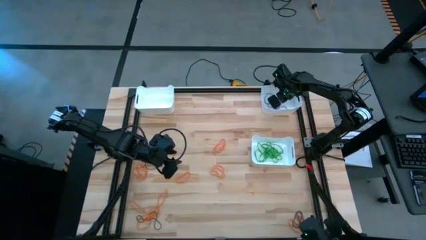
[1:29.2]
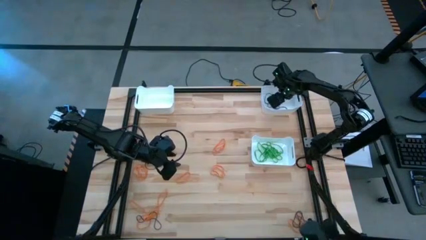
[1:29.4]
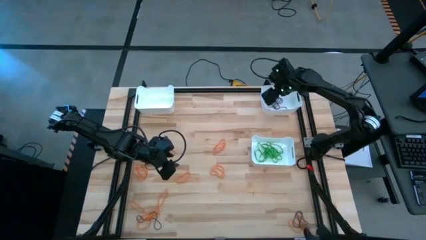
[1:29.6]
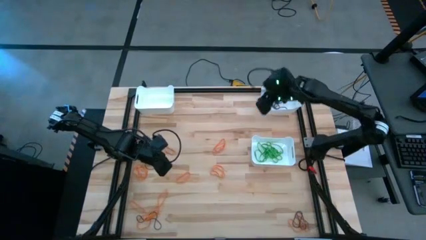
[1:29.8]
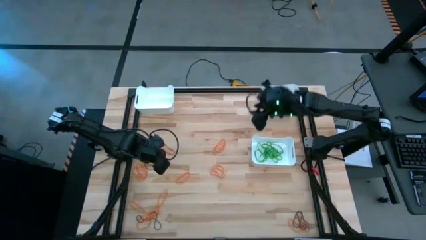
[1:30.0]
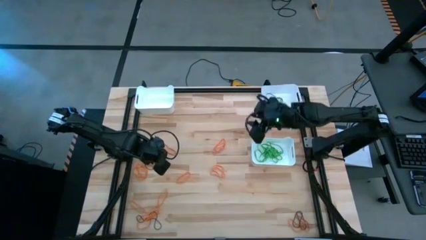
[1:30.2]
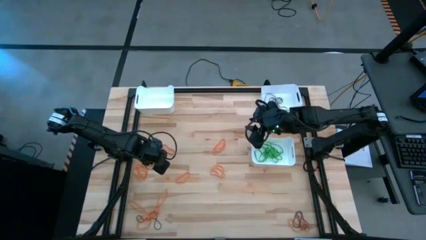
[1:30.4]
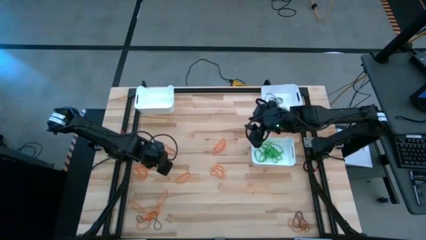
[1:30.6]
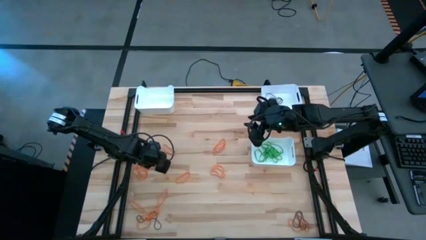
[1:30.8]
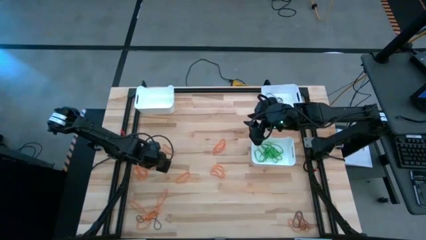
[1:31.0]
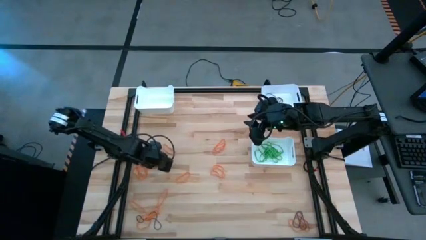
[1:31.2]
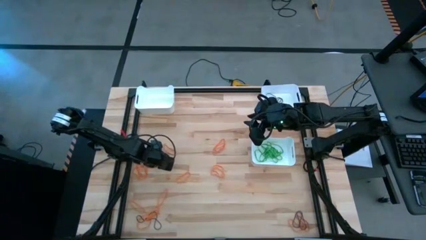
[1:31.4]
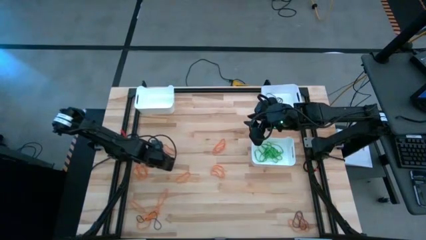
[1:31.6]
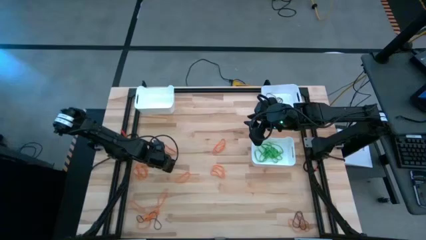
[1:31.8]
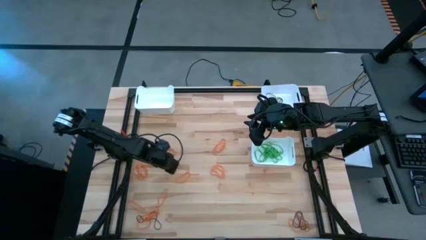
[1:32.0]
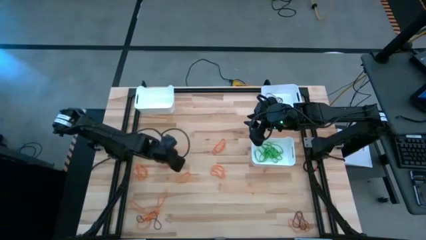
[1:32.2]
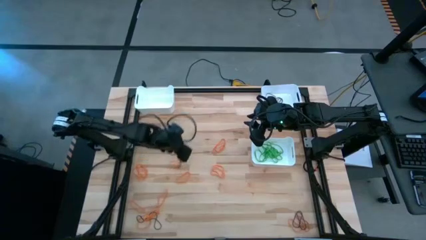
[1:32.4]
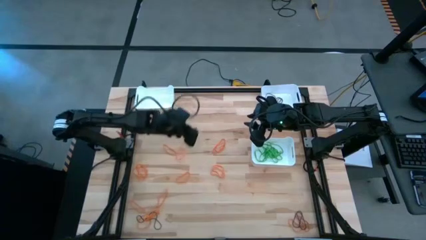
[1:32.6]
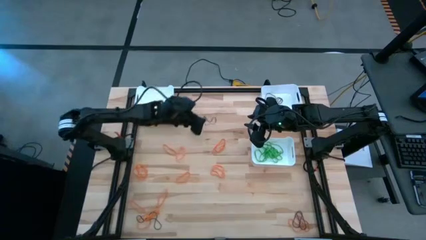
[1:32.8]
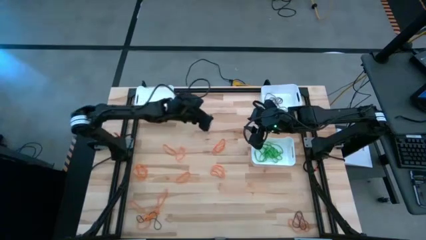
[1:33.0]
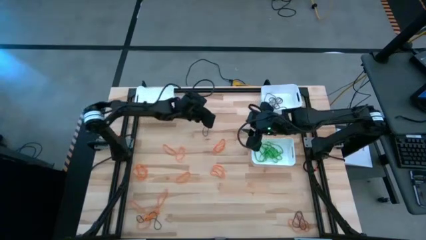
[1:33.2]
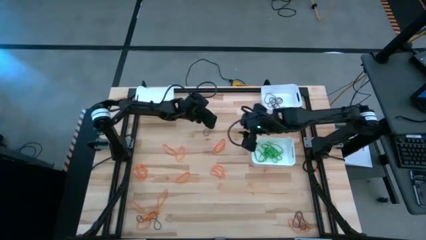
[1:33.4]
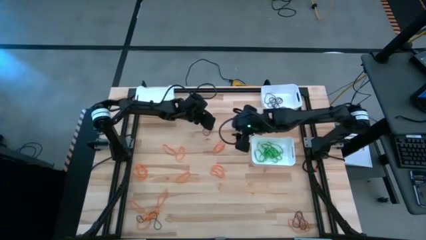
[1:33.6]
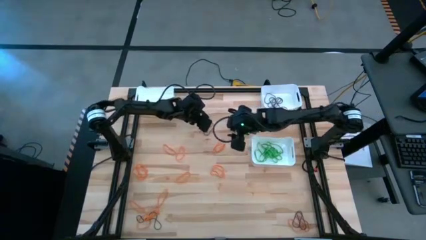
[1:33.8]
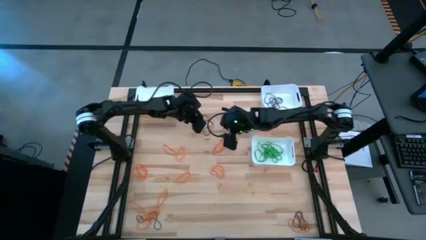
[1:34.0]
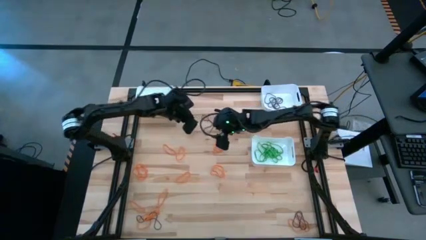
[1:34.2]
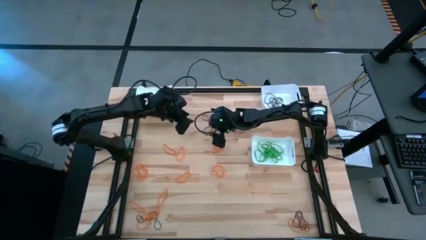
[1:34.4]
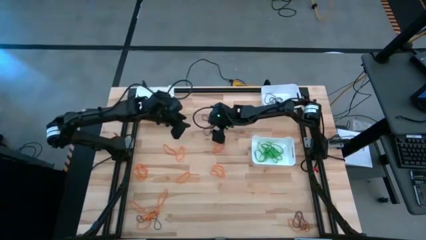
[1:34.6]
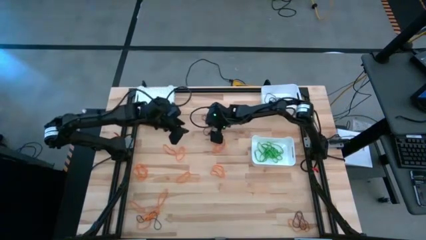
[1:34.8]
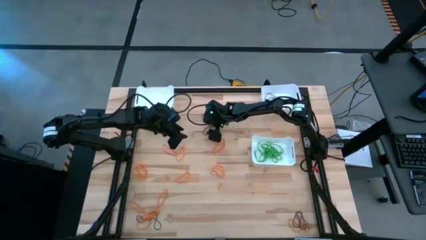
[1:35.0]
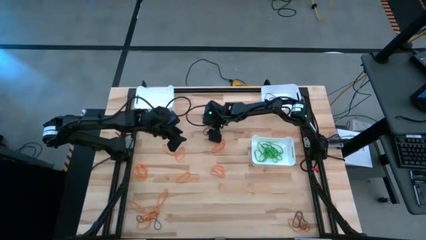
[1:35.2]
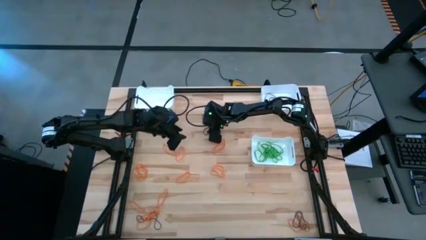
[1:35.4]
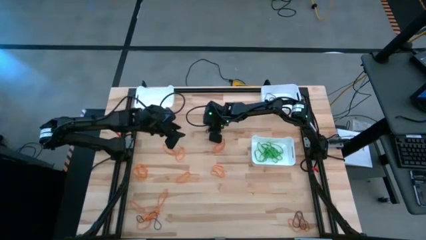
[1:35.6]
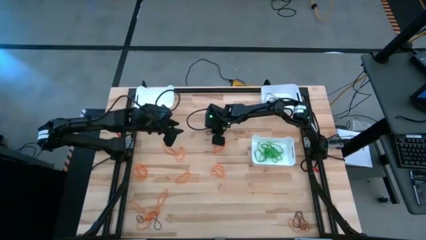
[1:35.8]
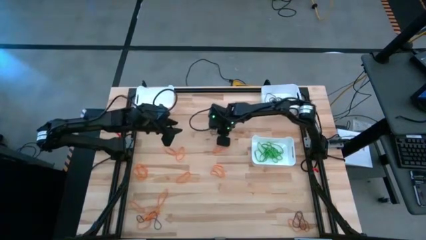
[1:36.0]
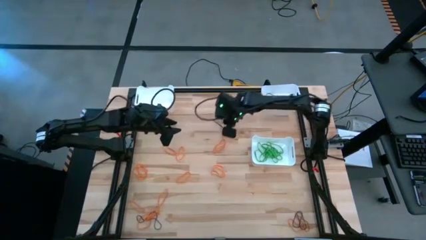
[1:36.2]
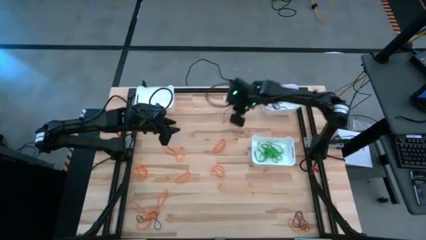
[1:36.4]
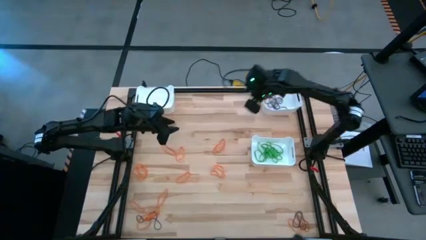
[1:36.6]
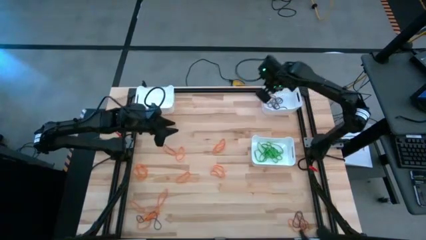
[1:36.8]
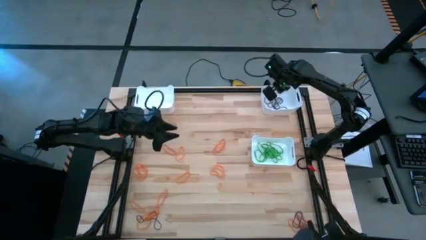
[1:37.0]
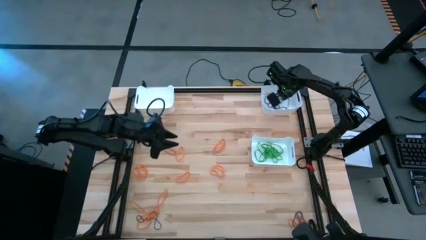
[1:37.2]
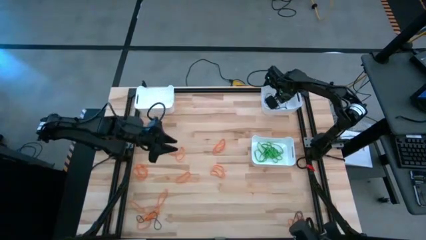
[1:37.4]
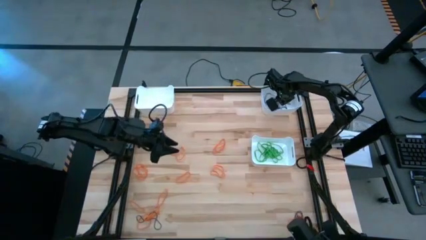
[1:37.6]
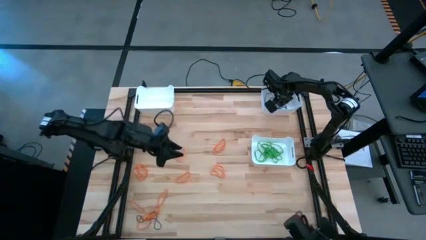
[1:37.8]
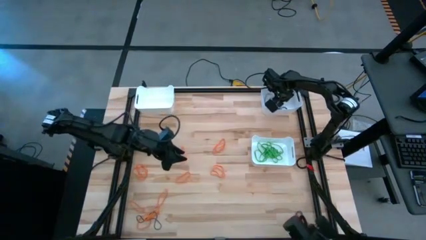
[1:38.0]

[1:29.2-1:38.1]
Task: Sort rubber bands into baskets
Put the black rubber band into the top right white bin

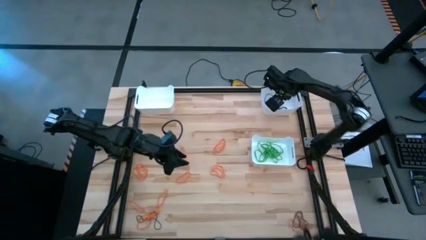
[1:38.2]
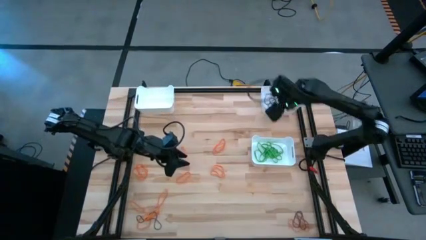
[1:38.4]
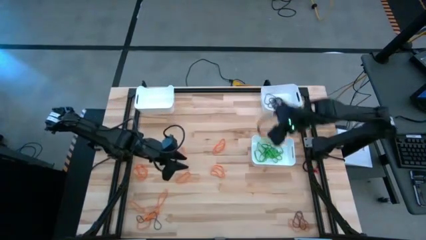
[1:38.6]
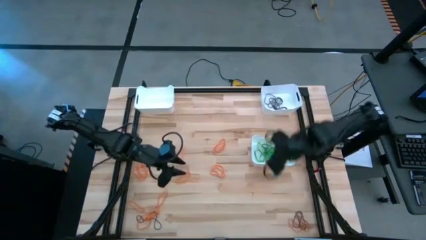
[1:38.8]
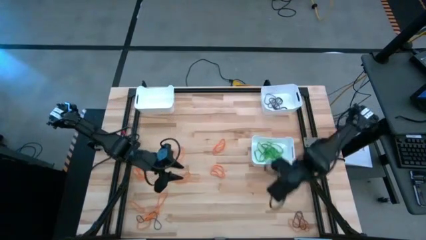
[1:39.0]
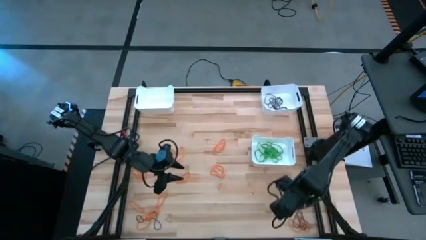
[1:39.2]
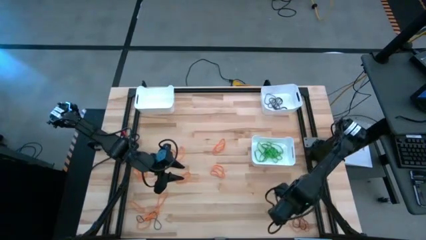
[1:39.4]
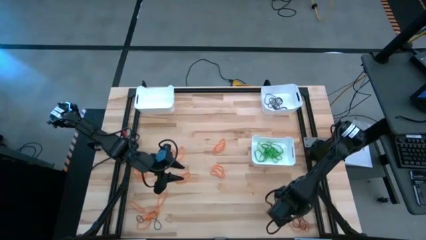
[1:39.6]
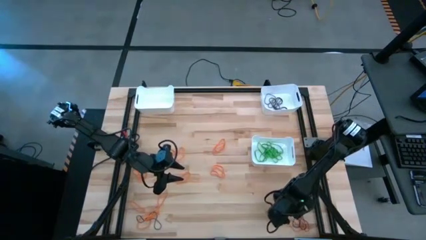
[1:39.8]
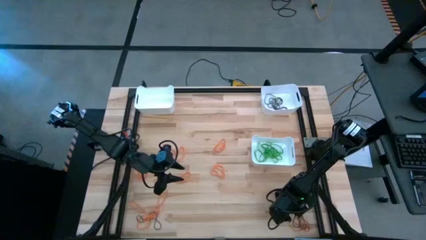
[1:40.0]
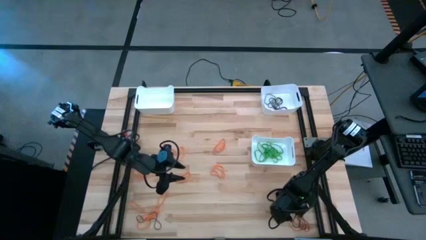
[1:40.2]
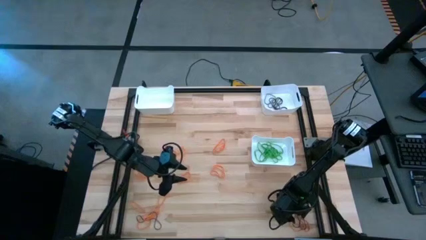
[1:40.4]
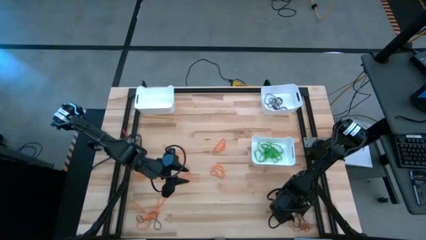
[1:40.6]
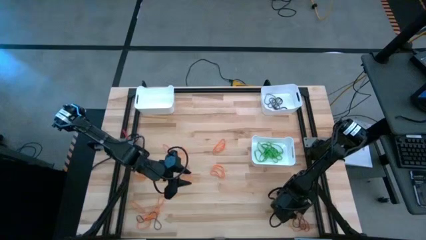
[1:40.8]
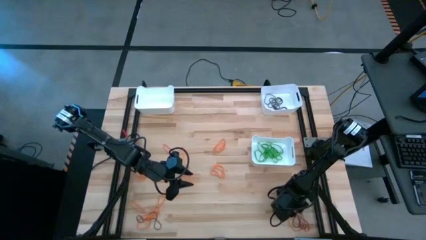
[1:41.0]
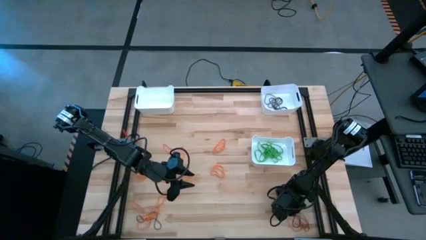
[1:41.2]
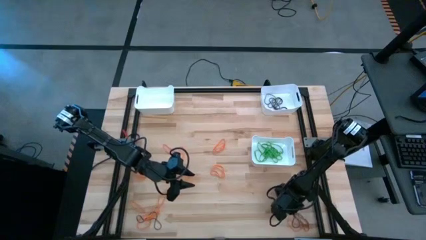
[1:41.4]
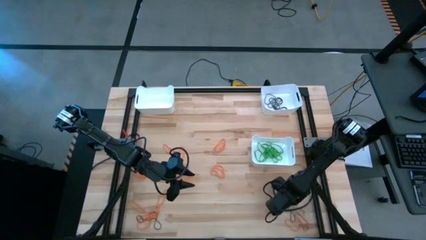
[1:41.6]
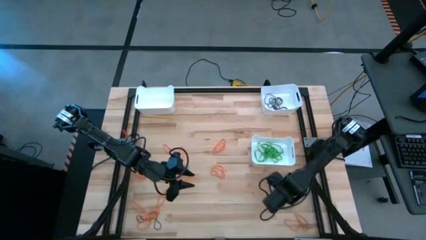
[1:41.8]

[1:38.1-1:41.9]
Put the black rubber band into the top right white bin

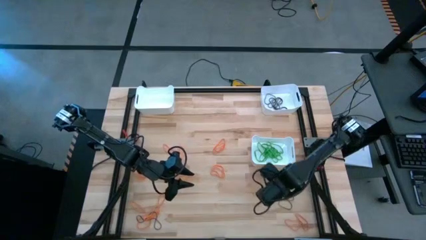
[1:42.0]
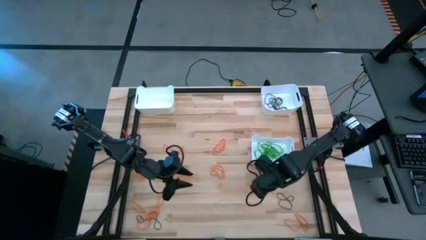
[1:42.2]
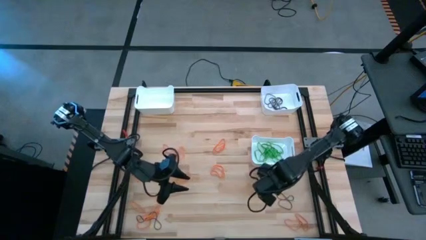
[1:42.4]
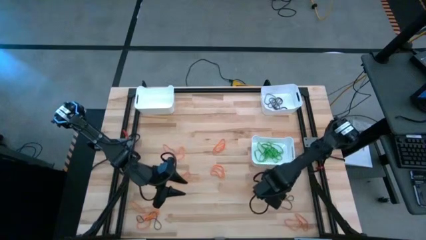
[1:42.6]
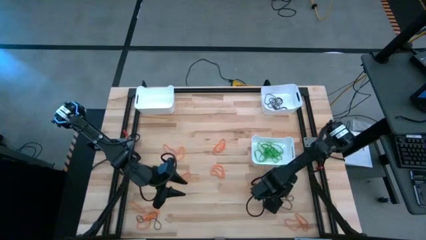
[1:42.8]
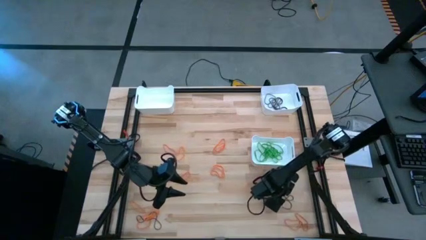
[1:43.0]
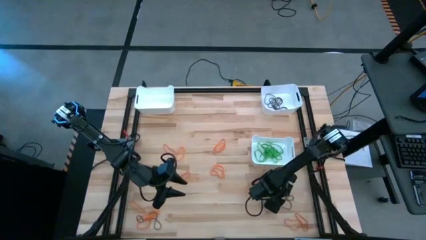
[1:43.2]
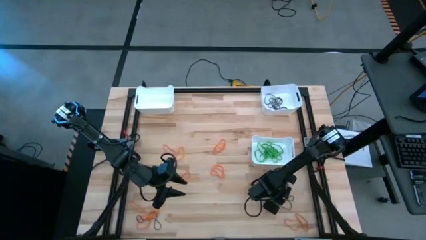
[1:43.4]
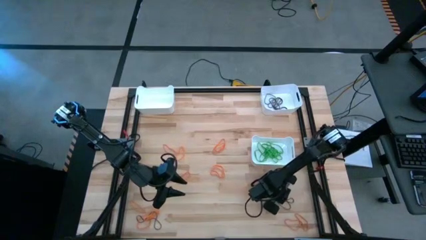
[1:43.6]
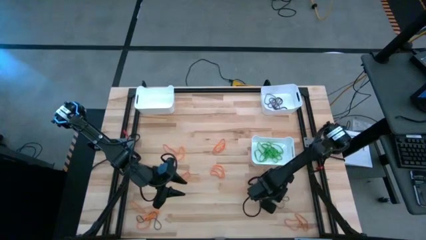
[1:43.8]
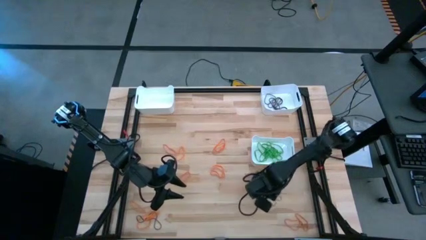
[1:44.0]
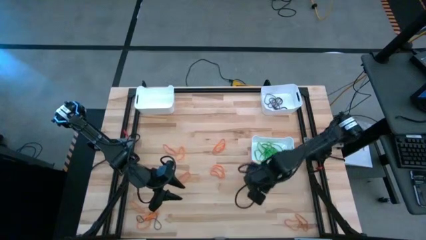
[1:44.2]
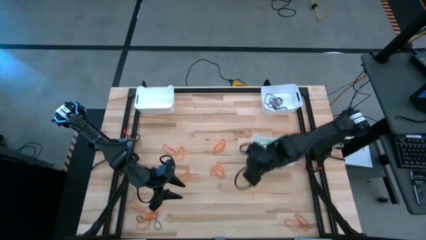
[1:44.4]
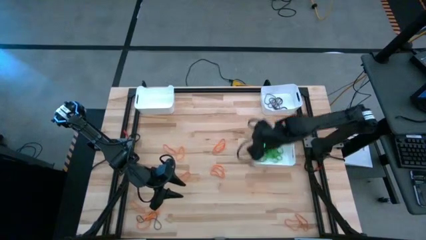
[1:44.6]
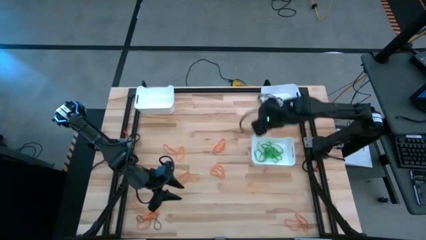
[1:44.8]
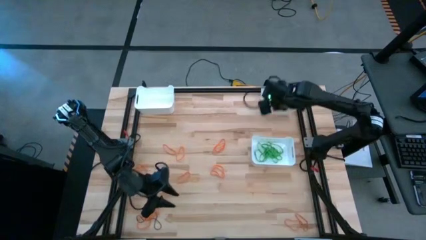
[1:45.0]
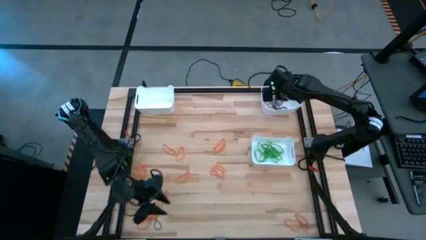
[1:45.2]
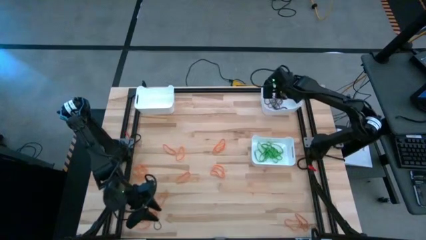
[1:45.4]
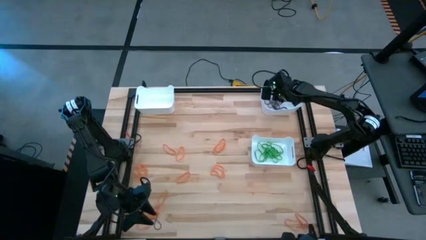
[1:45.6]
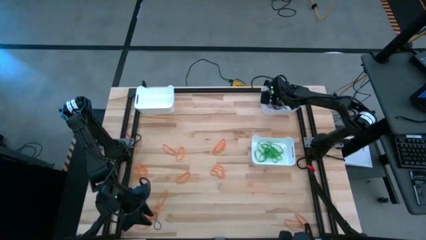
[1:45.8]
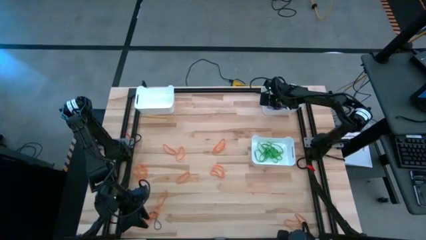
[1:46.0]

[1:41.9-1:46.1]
Put the black rubber band into the top right white bin
